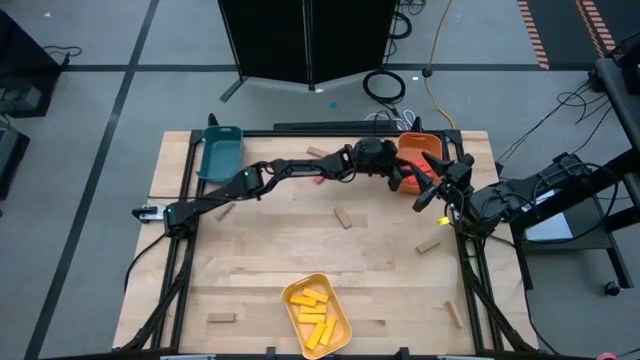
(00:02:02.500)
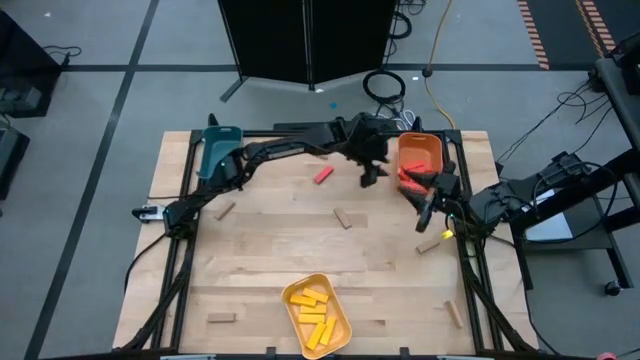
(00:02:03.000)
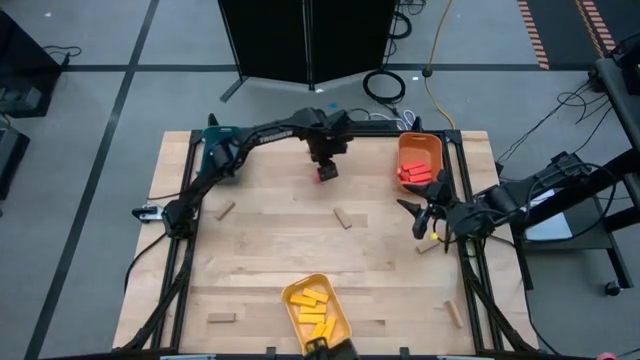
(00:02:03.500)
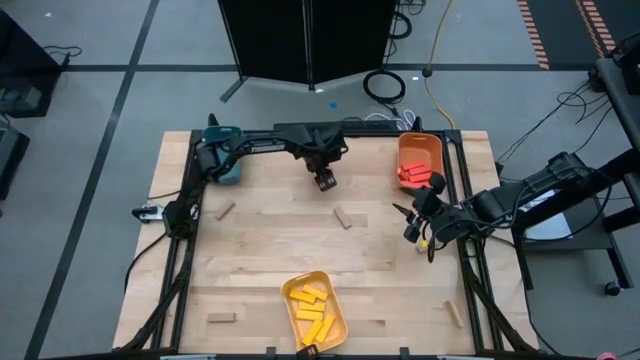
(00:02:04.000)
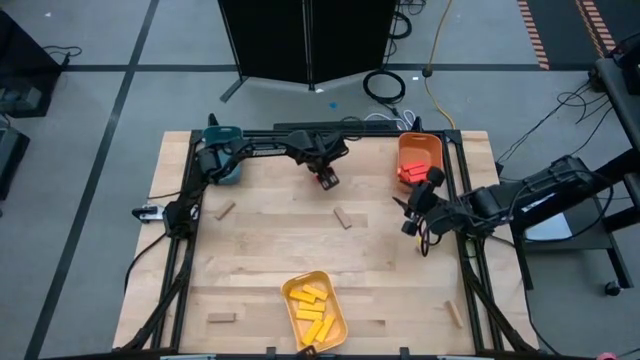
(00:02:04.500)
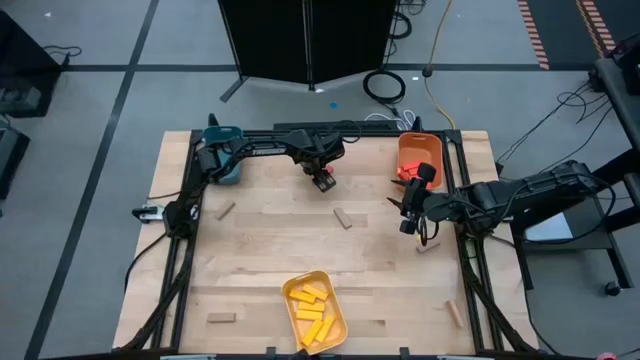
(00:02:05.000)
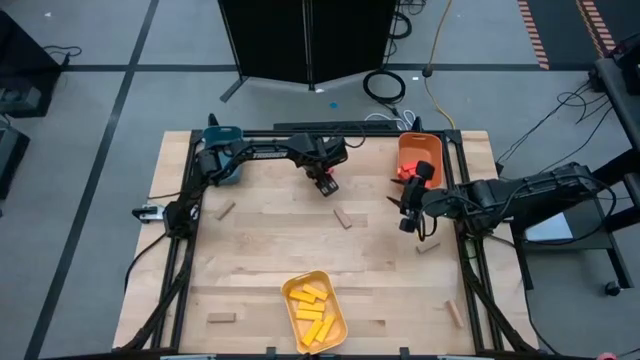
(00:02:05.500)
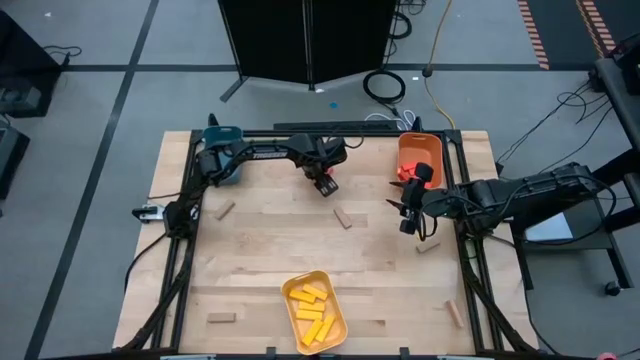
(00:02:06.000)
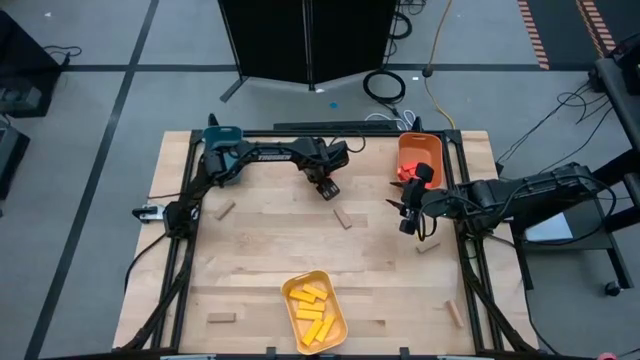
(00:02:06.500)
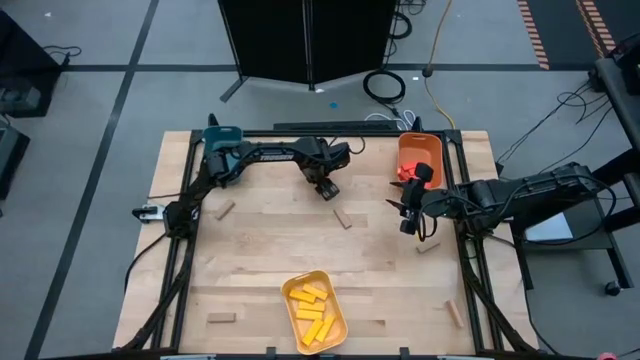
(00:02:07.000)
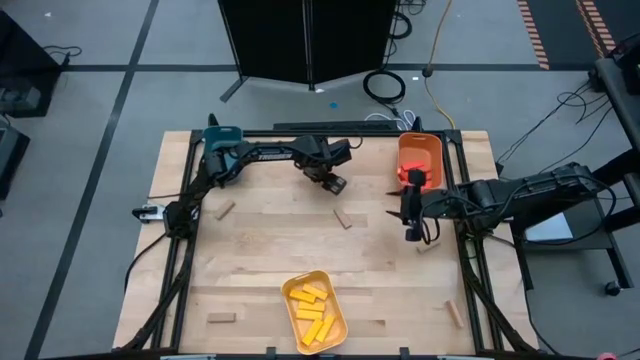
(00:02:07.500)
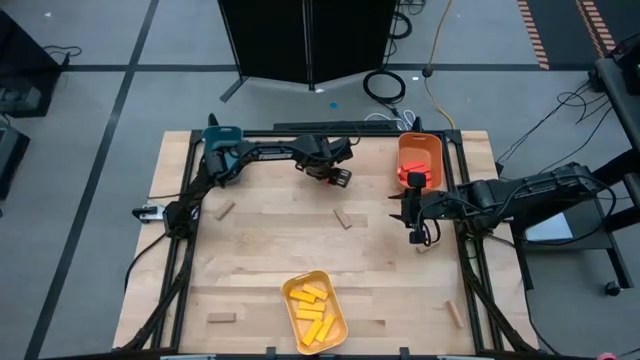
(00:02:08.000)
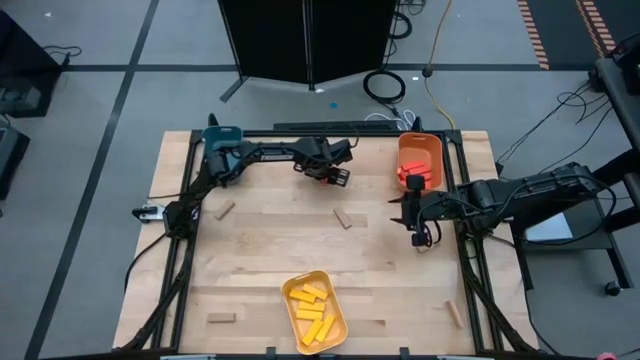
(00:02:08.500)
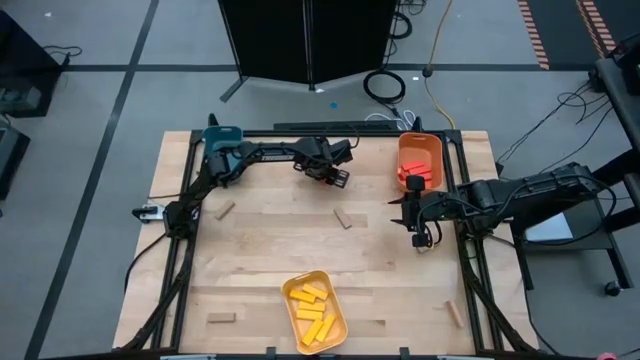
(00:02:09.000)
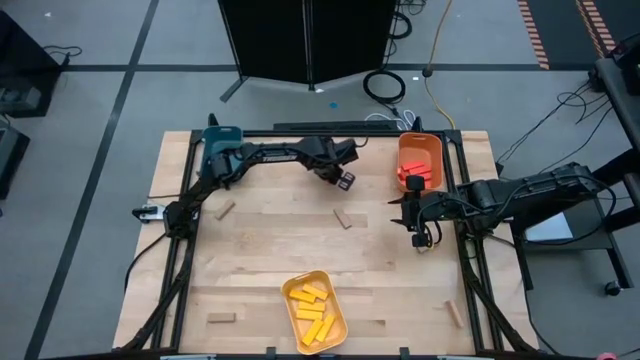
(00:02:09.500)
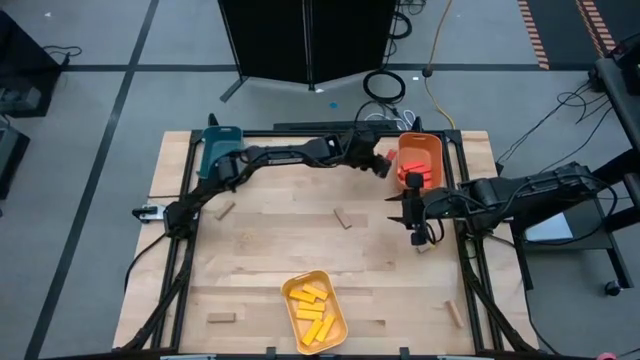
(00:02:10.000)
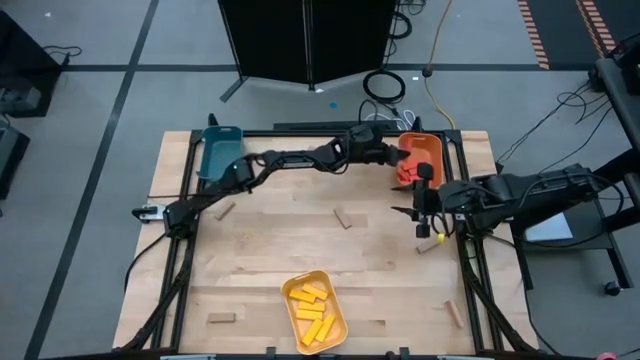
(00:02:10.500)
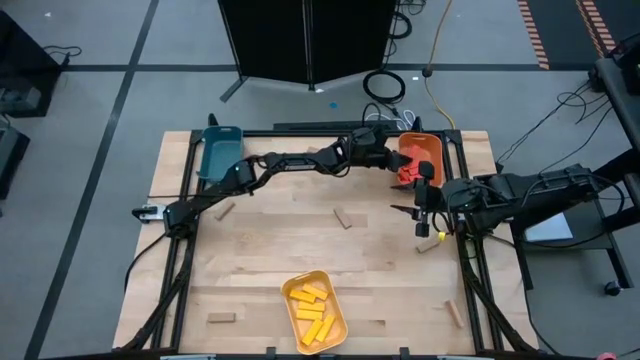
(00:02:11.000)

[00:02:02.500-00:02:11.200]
Task: Sort blocks
Put the red block into the orange bin

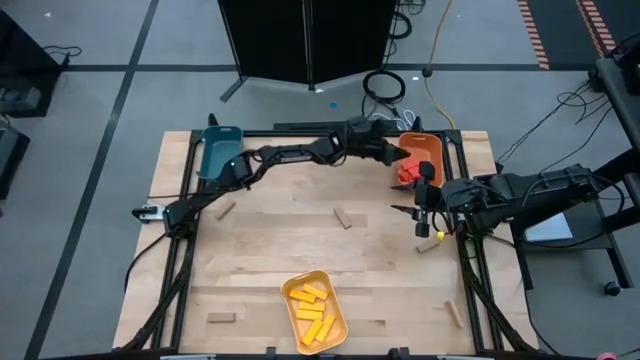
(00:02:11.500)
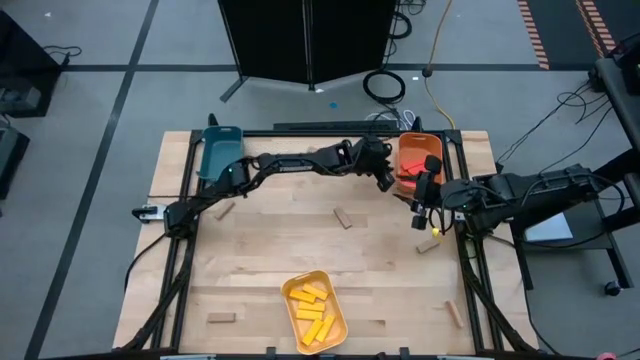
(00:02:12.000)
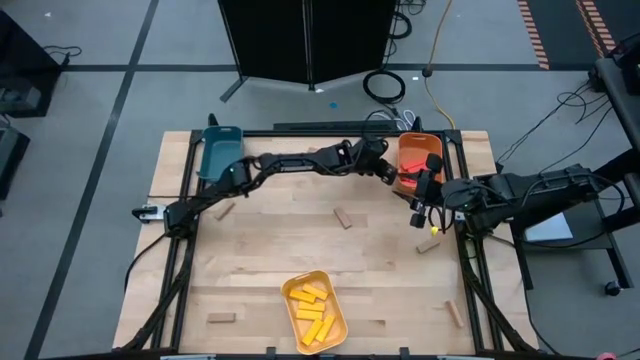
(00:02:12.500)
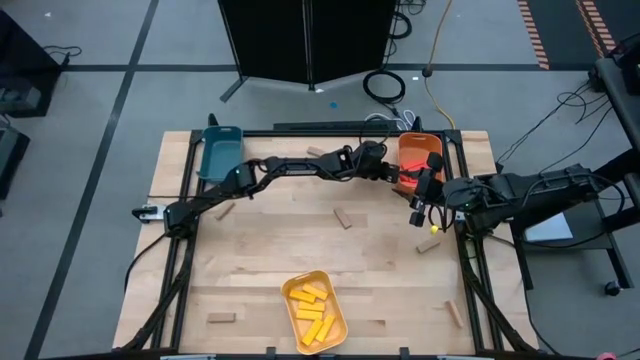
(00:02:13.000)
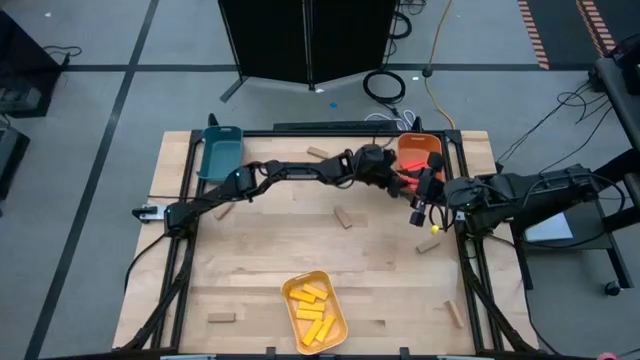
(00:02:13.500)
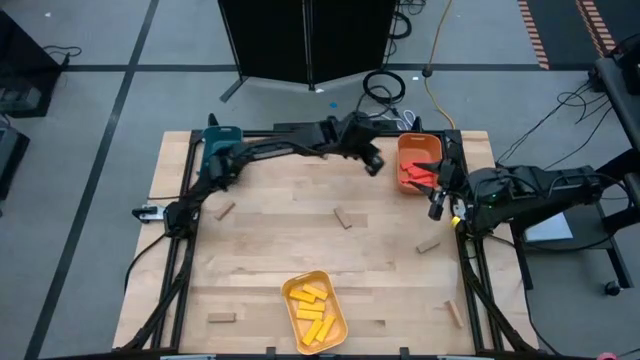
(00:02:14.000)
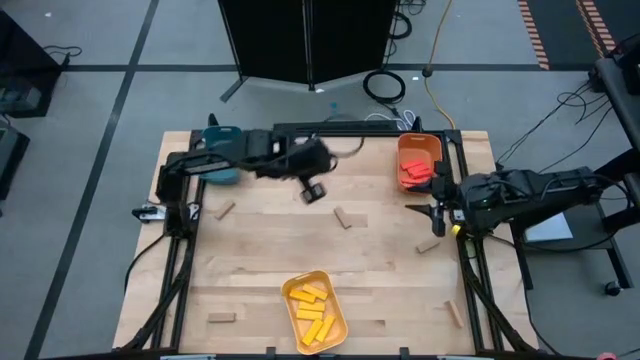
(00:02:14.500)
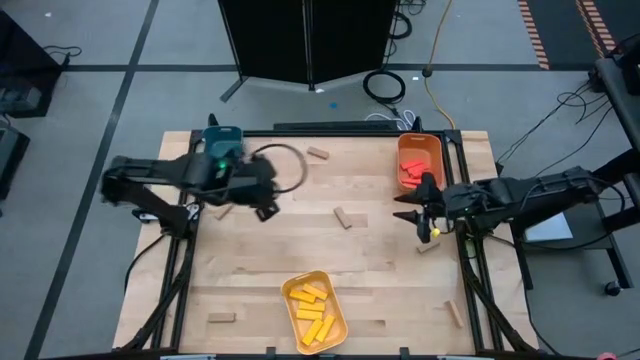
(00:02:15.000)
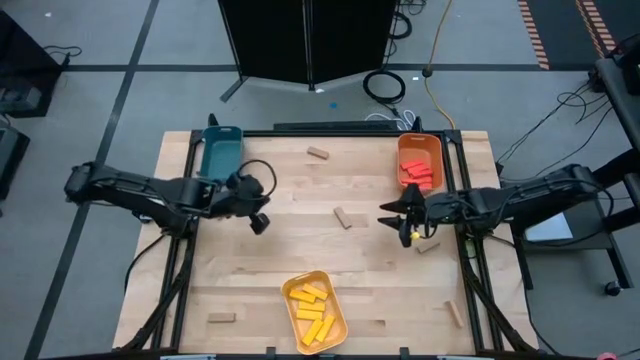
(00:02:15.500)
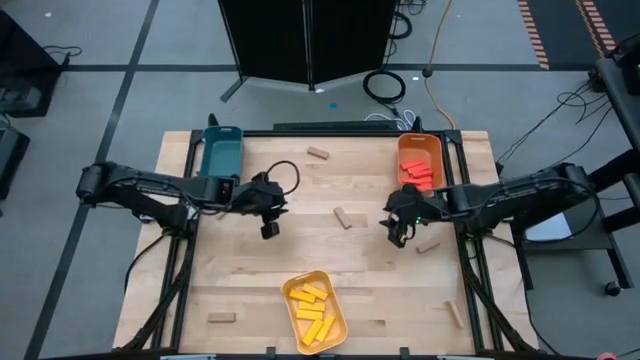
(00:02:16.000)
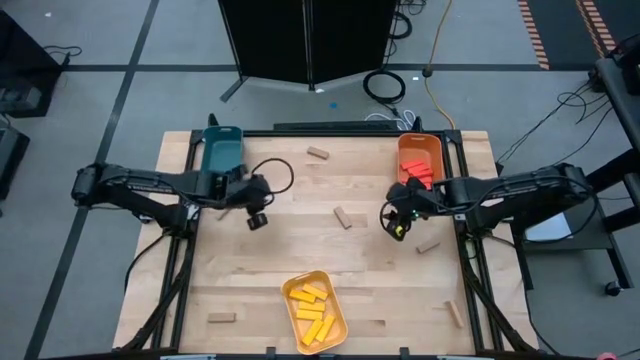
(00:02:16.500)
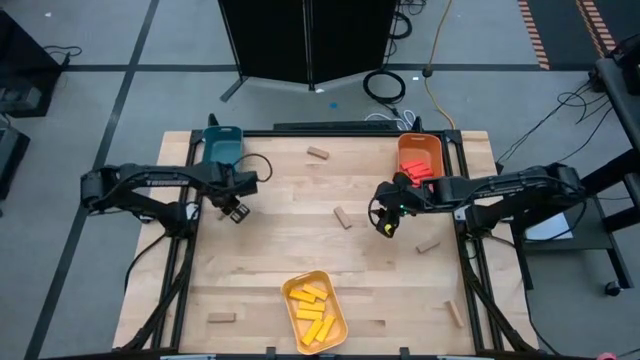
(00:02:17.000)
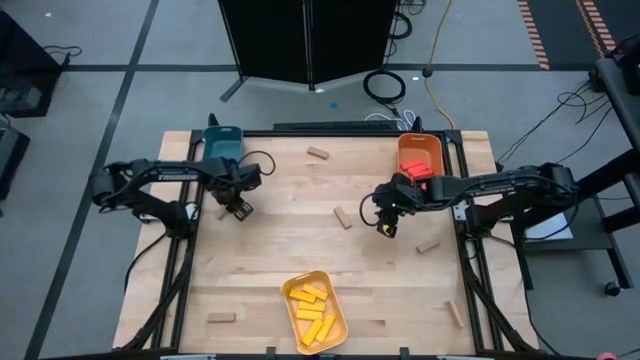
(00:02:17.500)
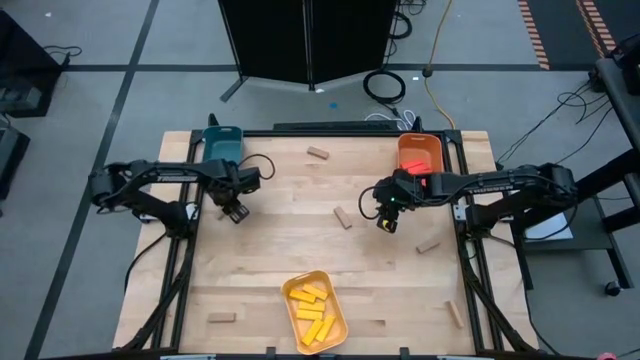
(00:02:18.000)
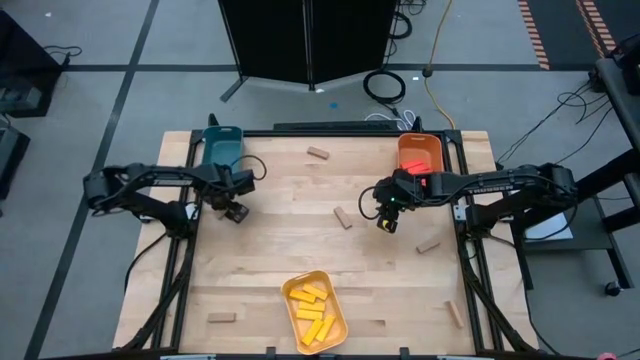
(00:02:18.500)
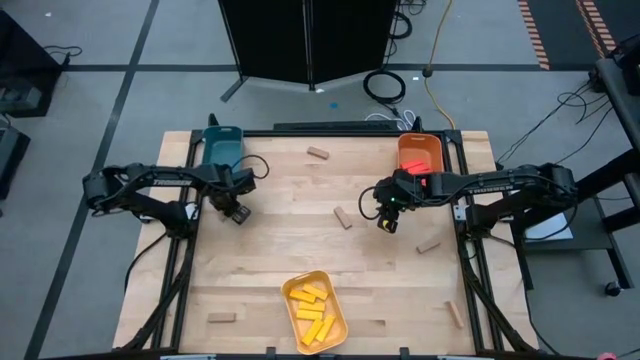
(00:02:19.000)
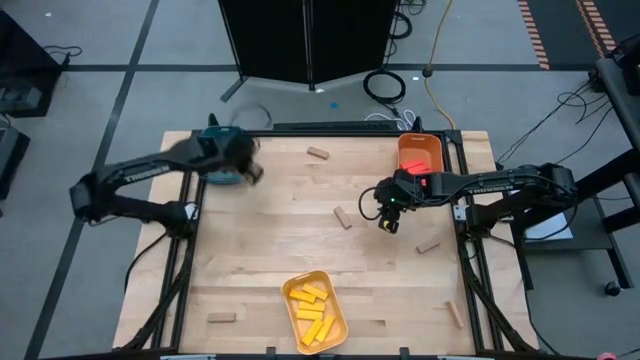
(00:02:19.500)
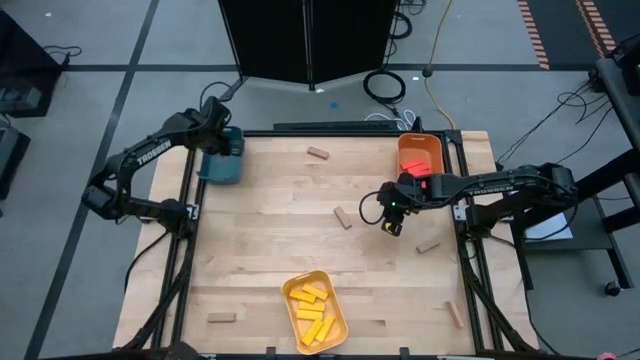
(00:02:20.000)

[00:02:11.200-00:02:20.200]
Put the brown block into the blue bin

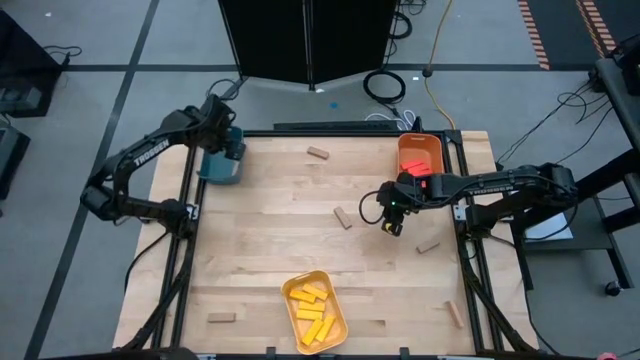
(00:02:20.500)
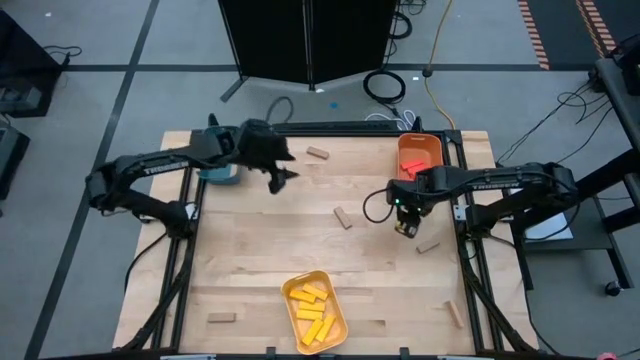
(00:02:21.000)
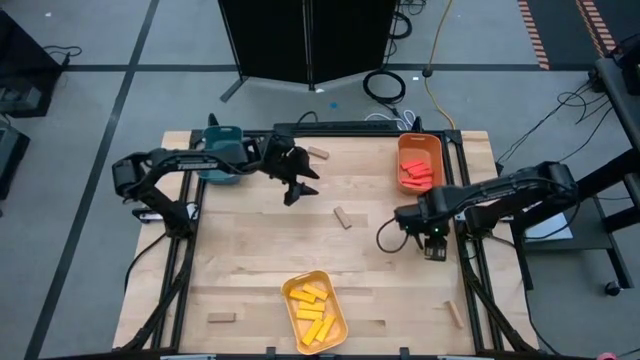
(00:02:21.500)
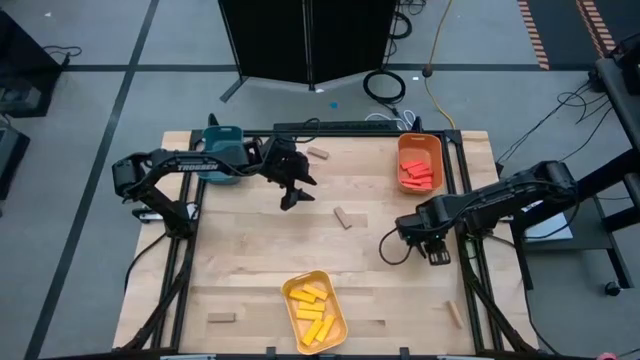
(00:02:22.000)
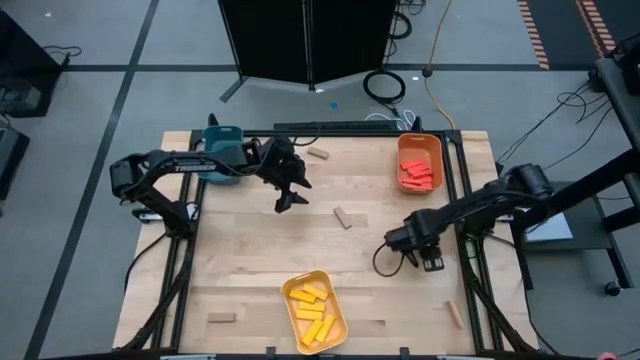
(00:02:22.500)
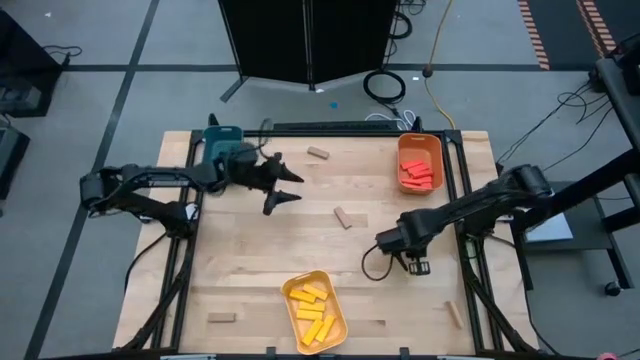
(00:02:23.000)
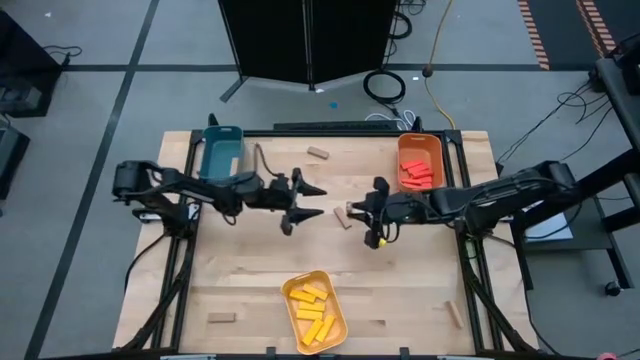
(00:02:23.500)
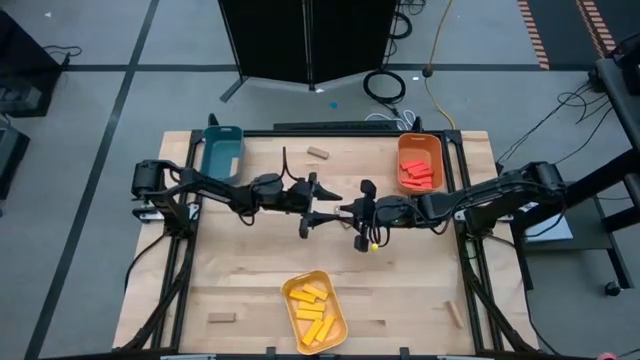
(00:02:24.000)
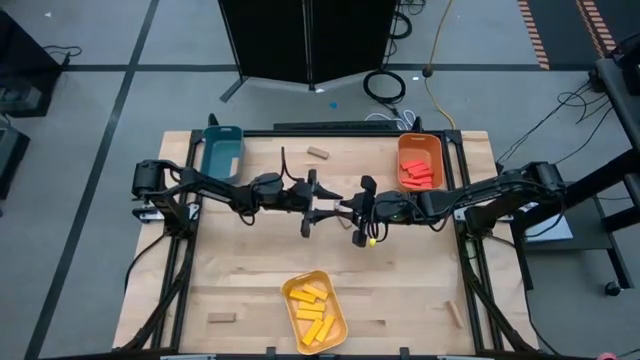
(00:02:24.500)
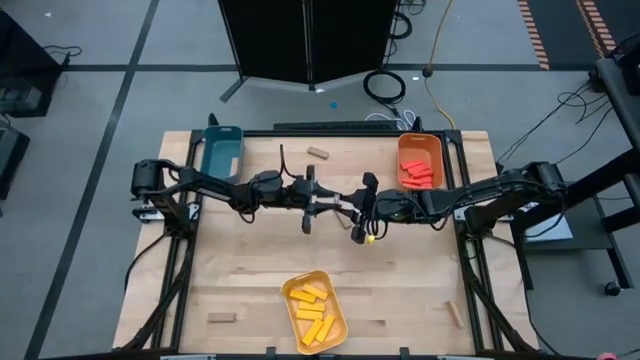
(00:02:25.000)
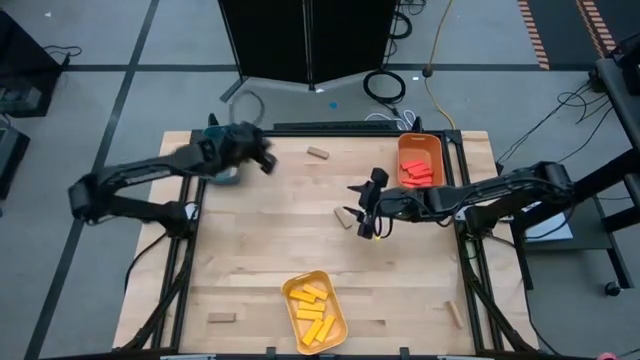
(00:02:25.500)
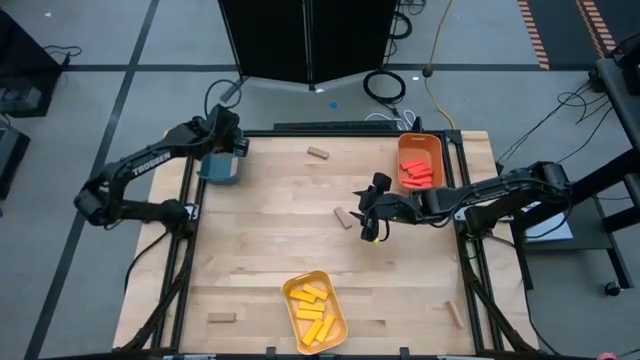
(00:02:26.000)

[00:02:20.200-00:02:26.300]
Put the brown block into the blue bin
